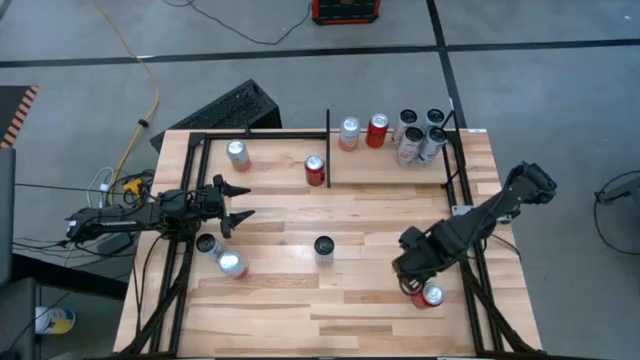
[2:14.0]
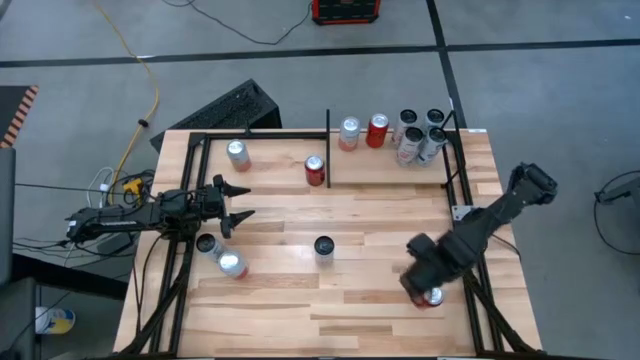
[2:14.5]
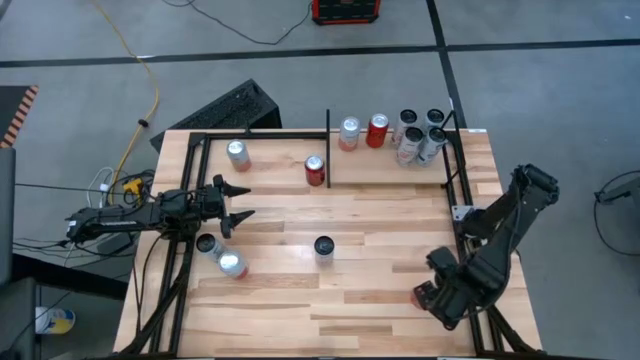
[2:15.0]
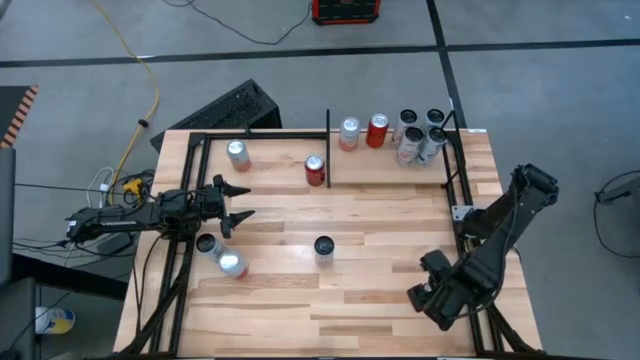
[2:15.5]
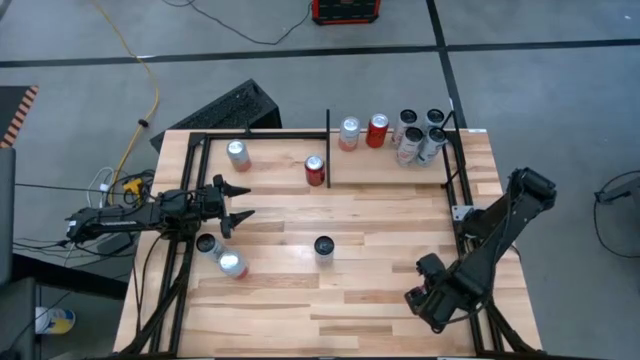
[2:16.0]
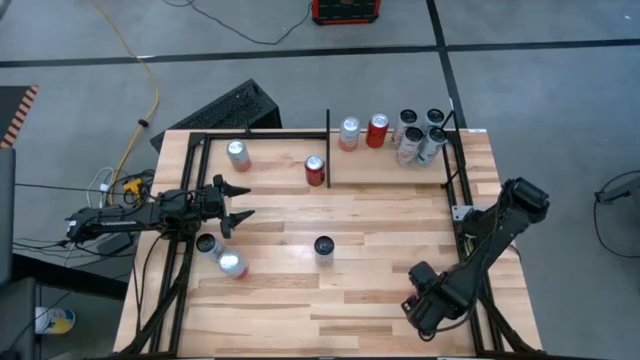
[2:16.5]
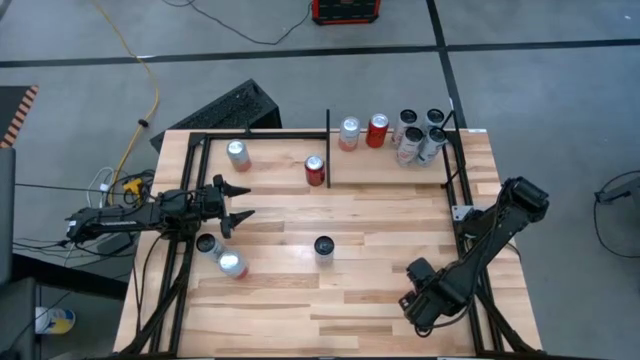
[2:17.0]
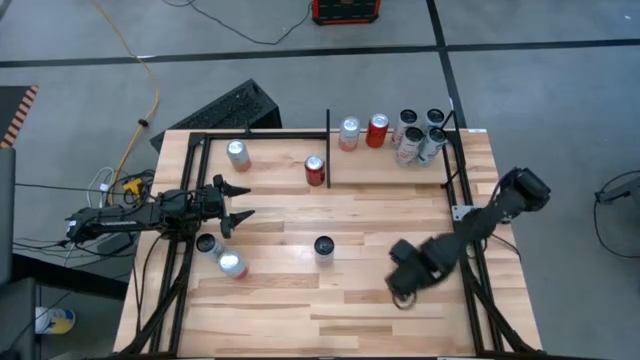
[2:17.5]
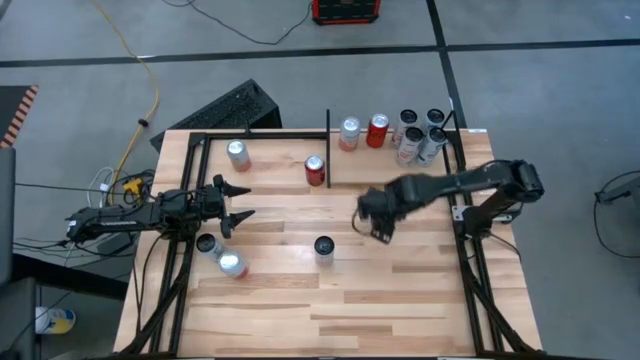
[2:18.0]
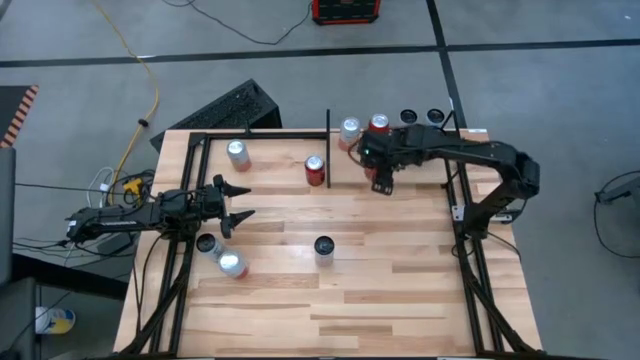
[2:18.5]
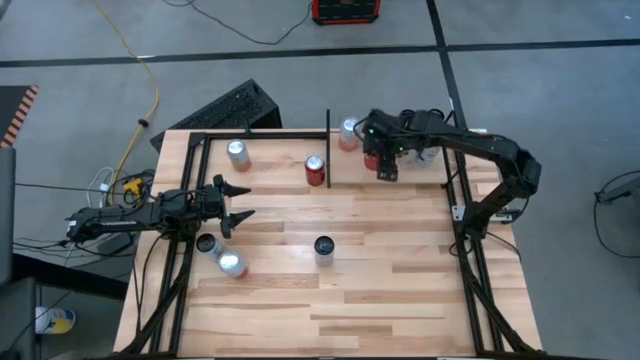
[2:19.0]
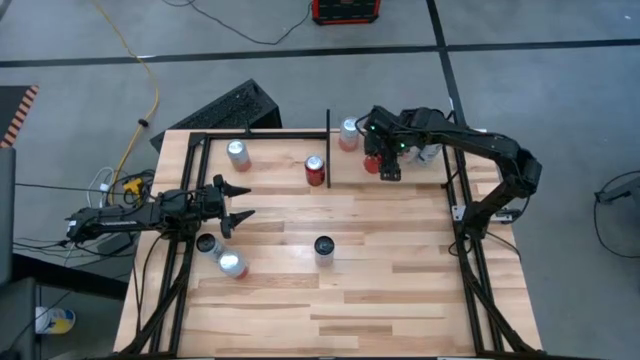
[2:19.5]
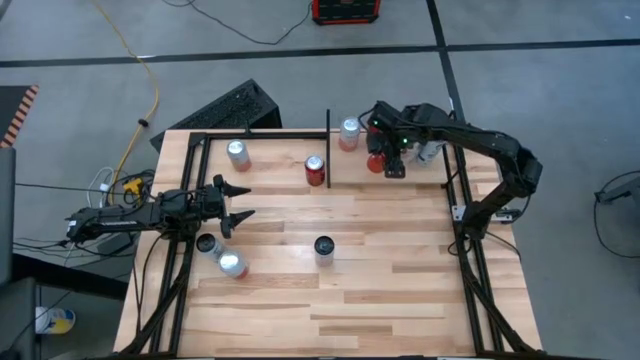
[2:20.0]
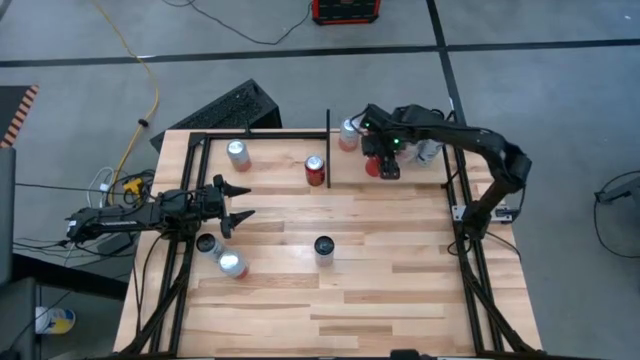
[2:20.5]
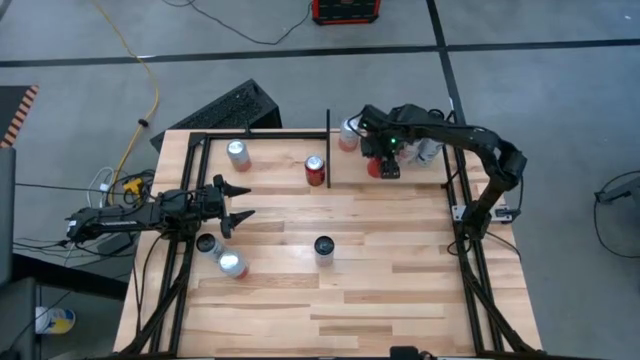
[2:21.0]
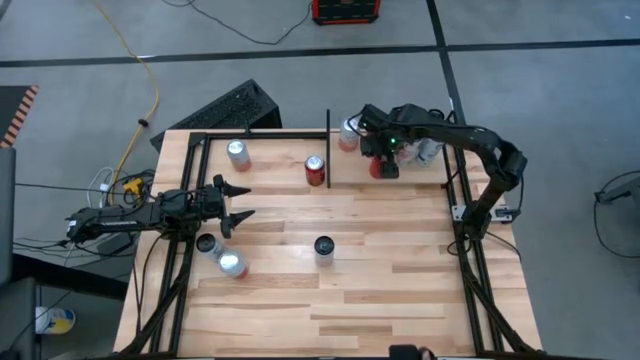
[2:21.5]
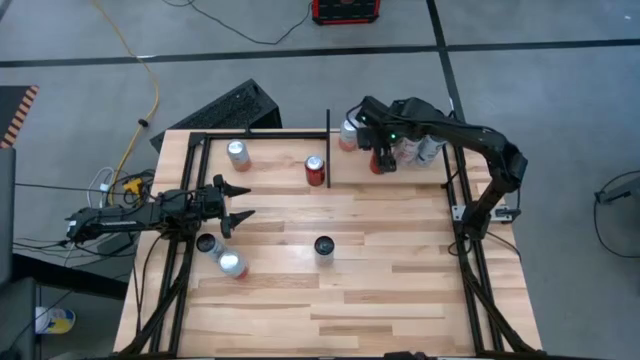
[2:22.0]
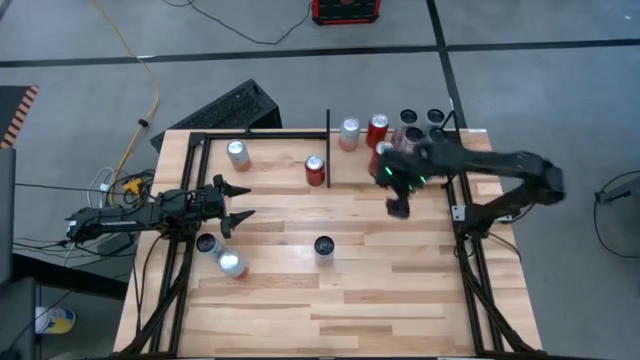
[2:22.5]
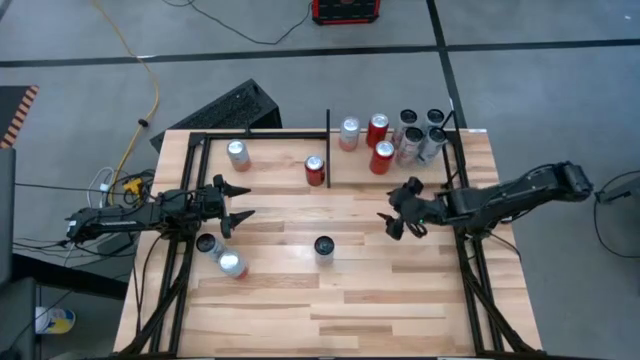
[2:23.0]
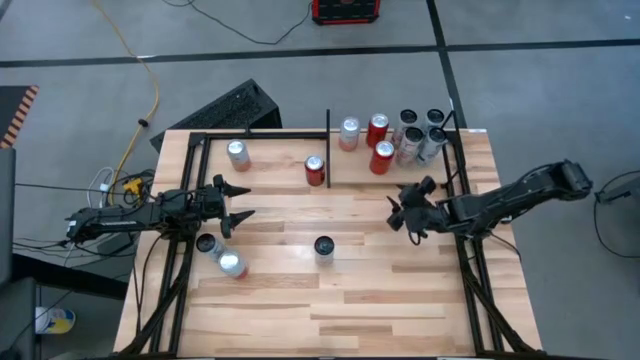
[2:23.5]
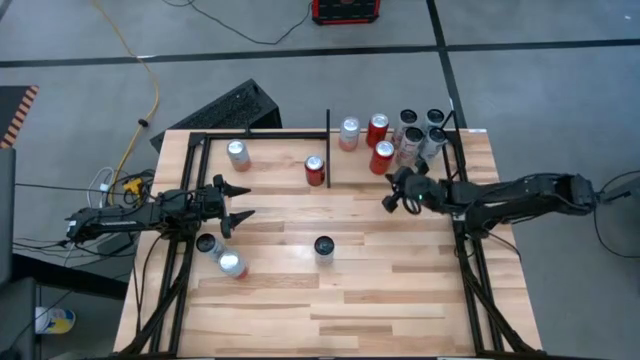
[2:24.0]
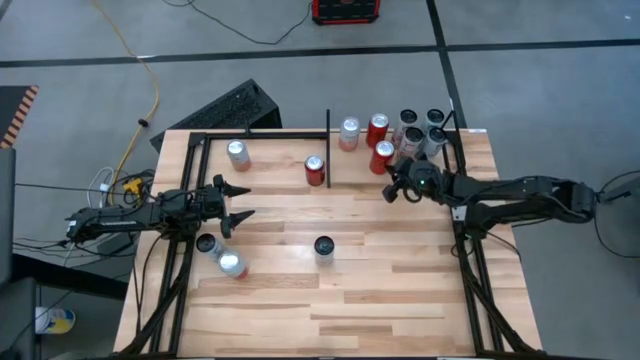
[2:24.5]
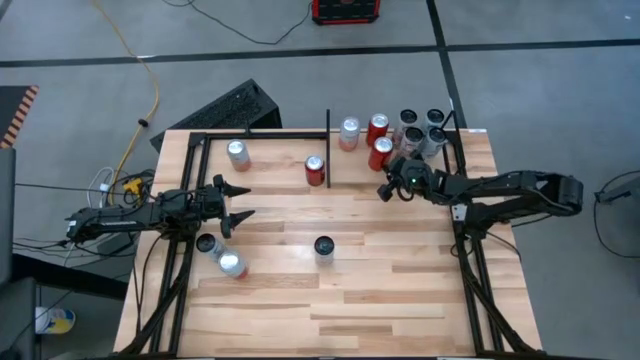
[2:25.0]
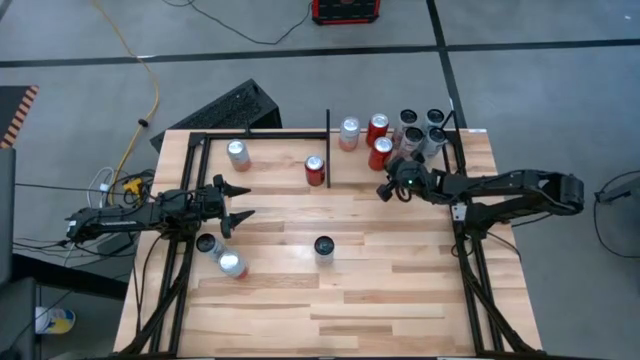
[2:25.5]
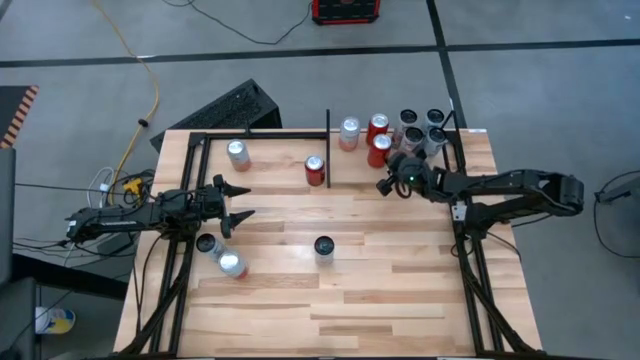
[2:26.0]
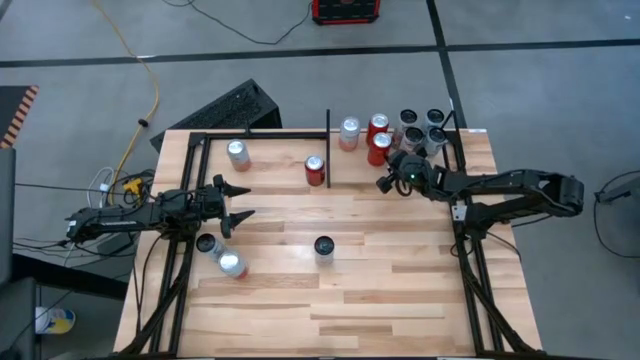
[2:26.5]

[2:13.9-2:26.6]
Task: Place canned beverage on shelf
Put the red soda can on the shelf

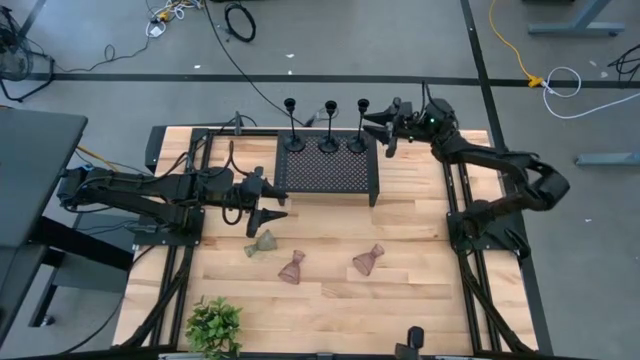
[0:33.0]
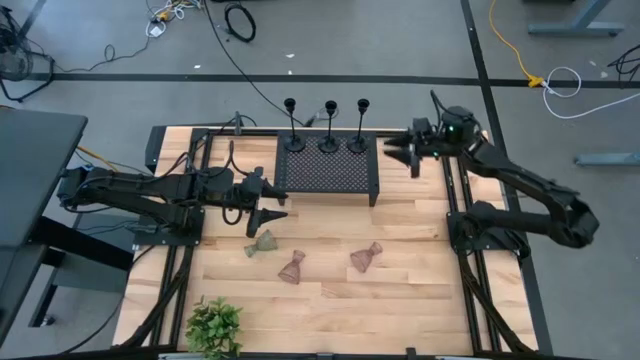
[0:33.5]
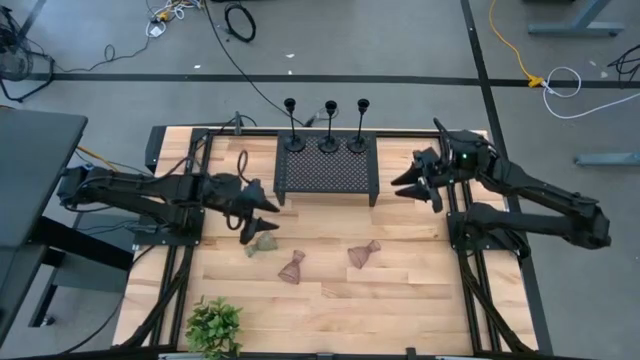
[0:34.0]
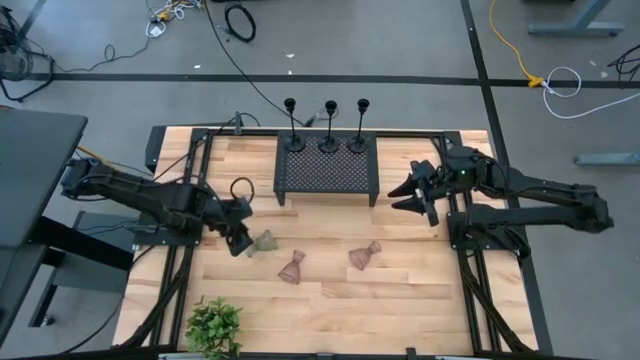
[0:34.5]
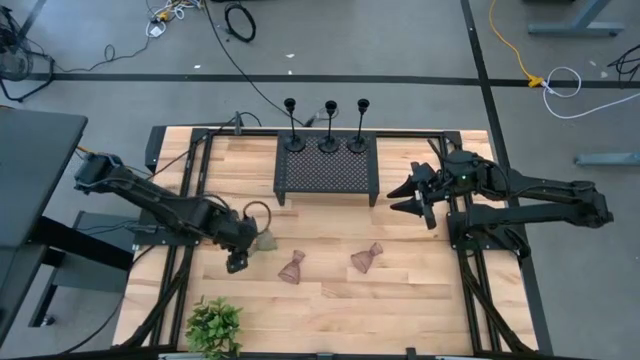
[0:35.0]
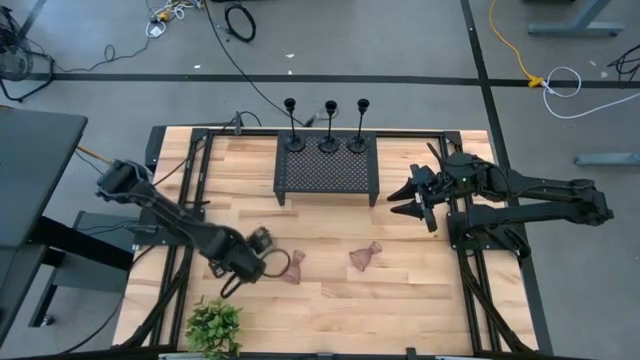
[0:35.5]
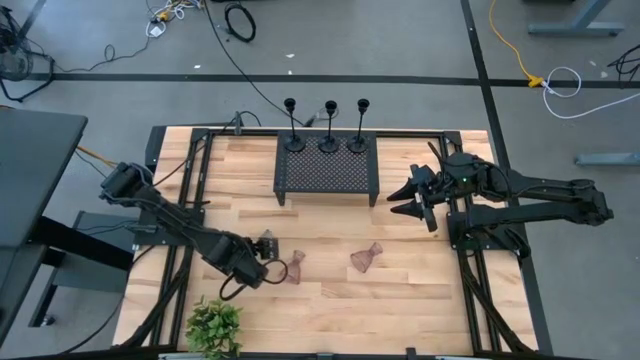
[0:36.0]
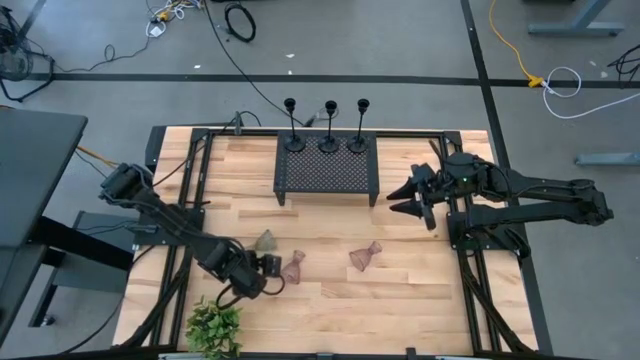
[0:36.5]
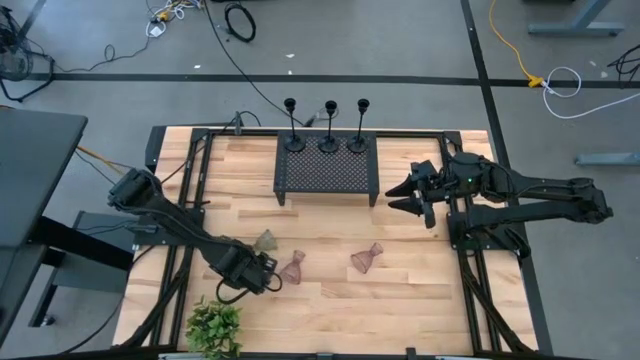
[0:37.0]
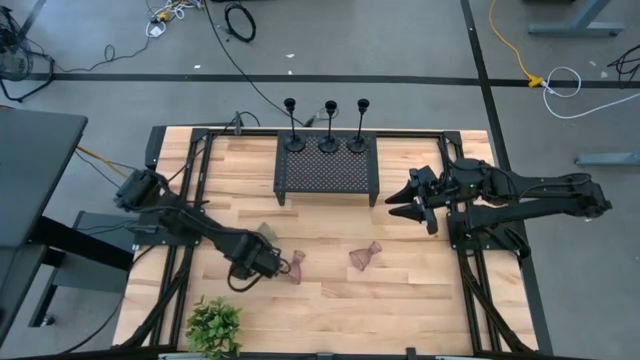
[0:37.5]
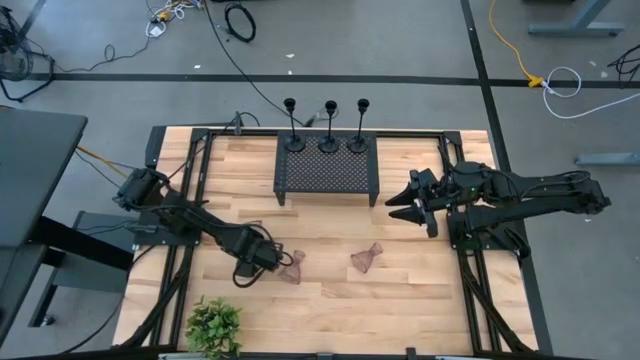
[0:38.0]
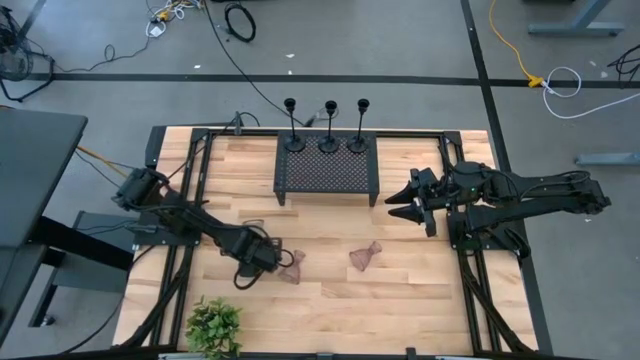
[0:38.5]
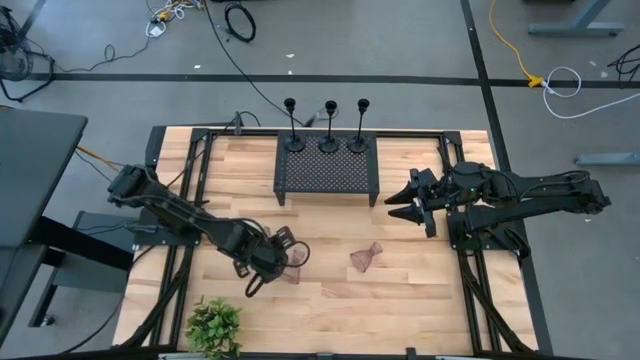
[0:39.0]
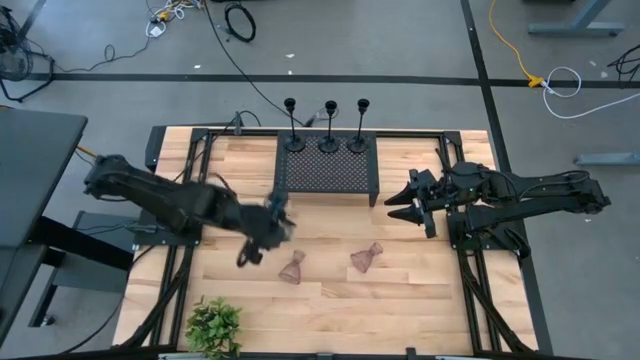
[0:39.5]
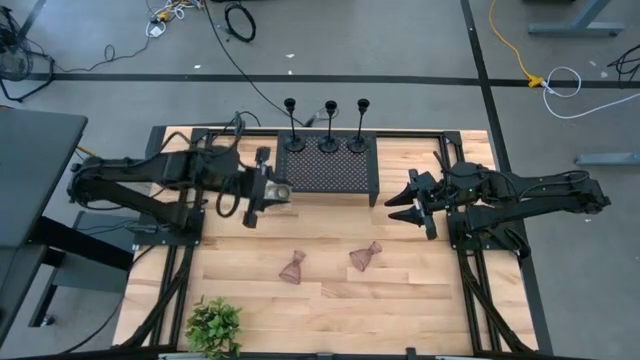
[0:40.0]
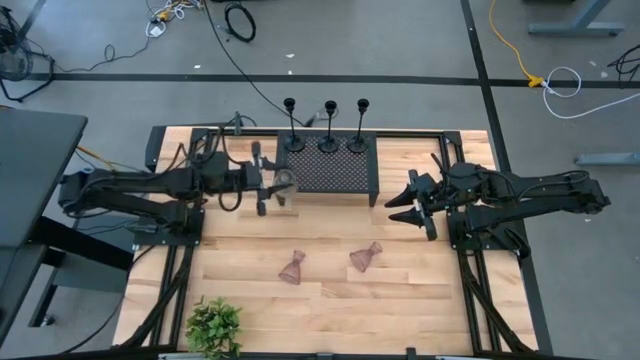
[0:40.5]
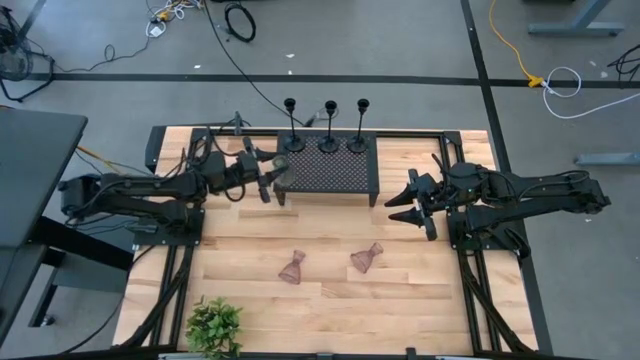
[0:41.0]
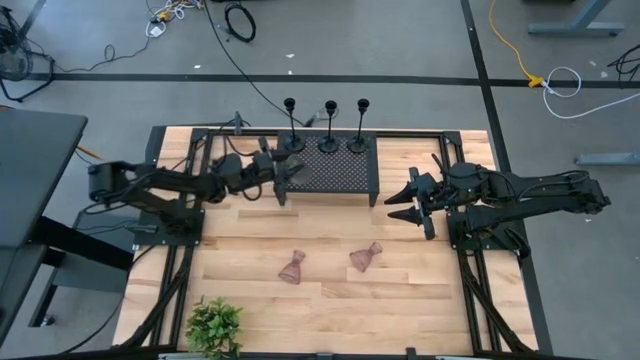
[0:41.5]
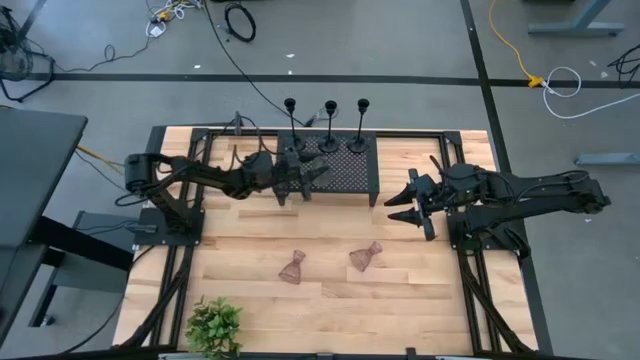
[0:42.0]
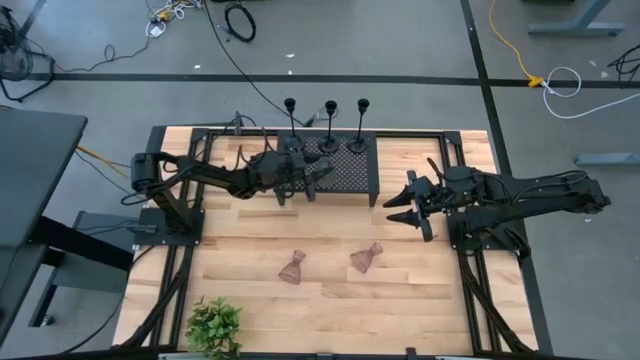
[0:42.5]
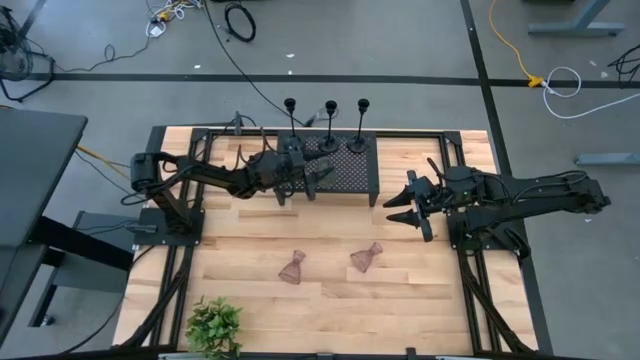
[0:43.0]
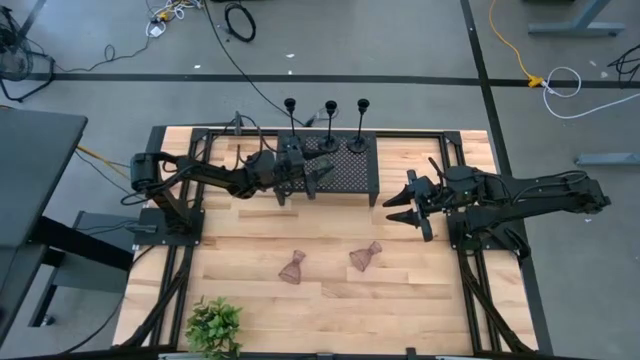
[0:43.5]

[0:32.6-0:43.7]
Task: Pick & Place candle stick holders
Put the green glass candle holder on the shelf
